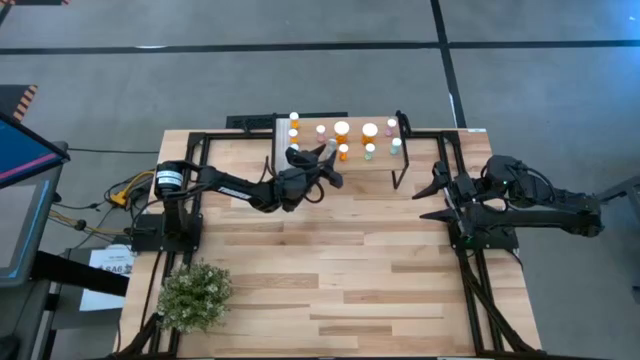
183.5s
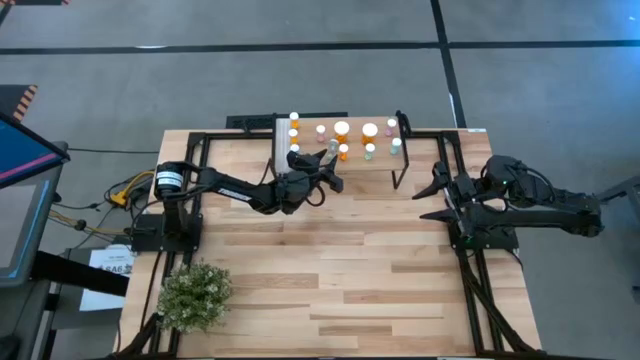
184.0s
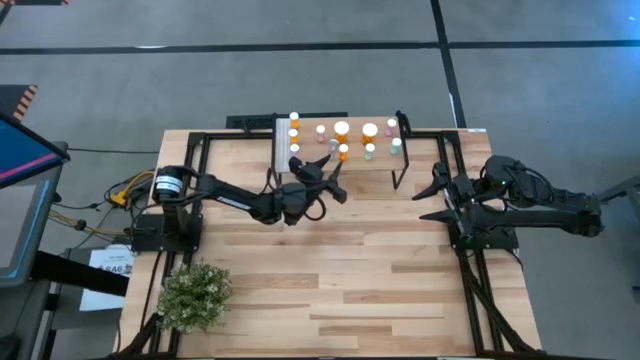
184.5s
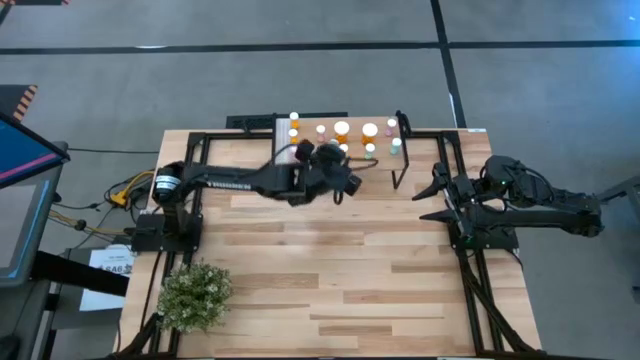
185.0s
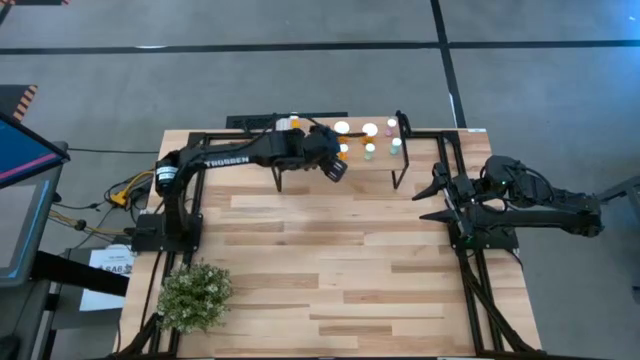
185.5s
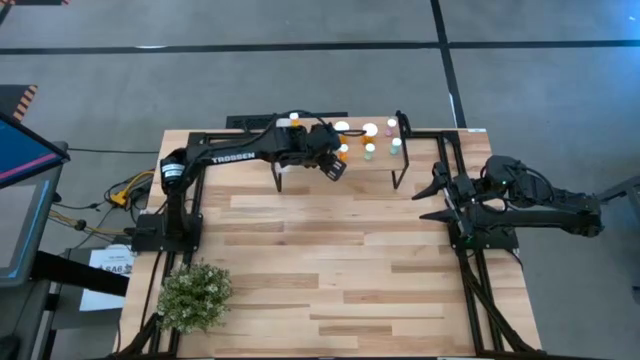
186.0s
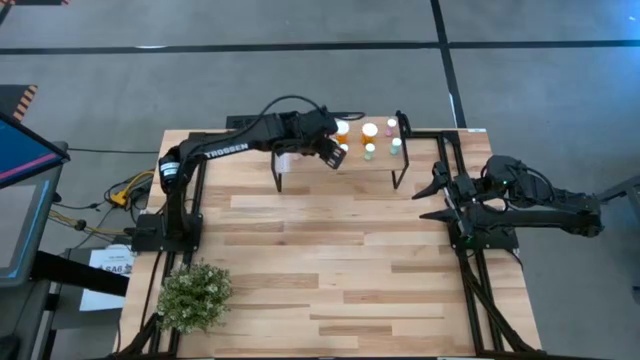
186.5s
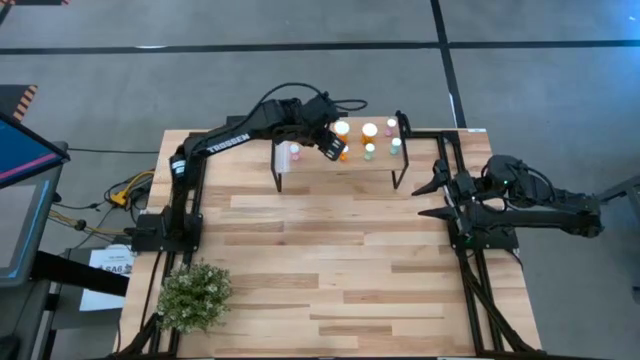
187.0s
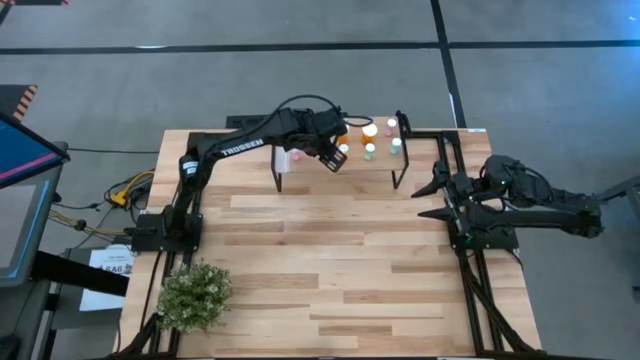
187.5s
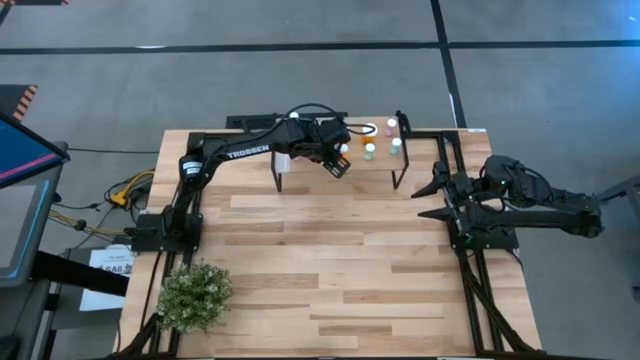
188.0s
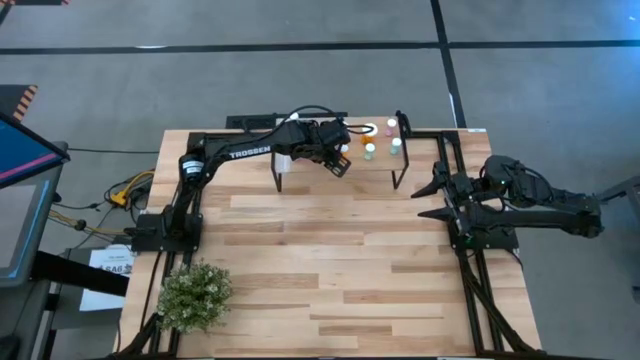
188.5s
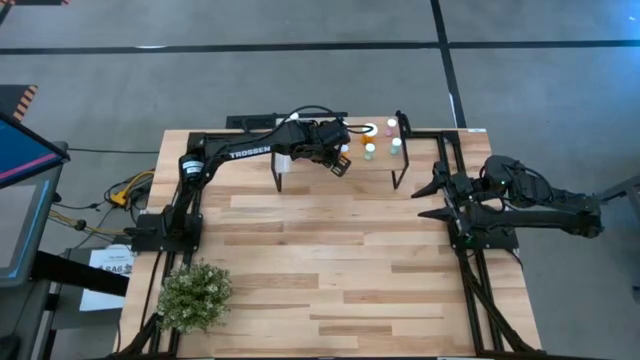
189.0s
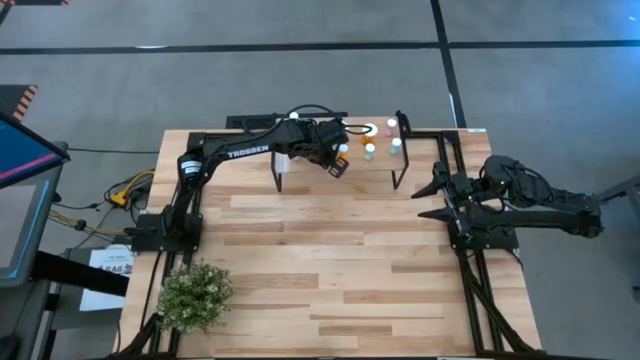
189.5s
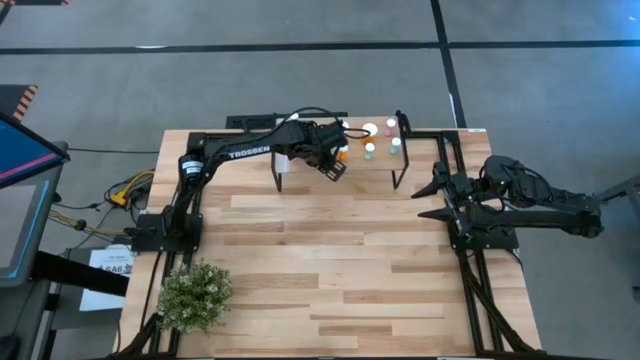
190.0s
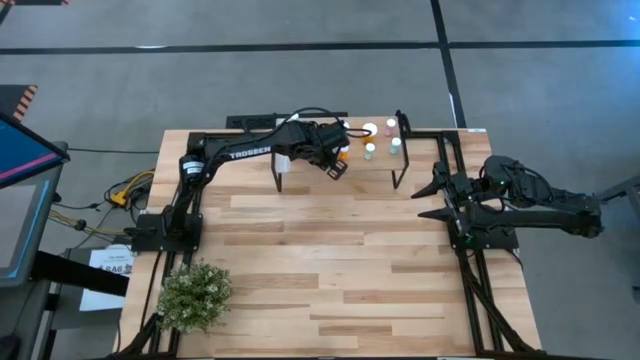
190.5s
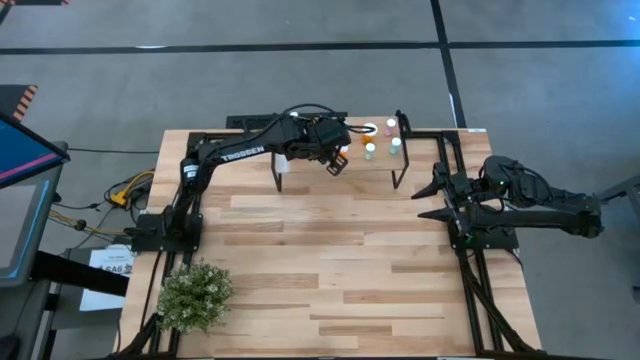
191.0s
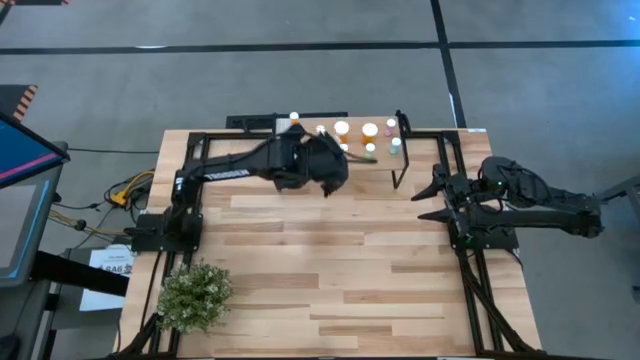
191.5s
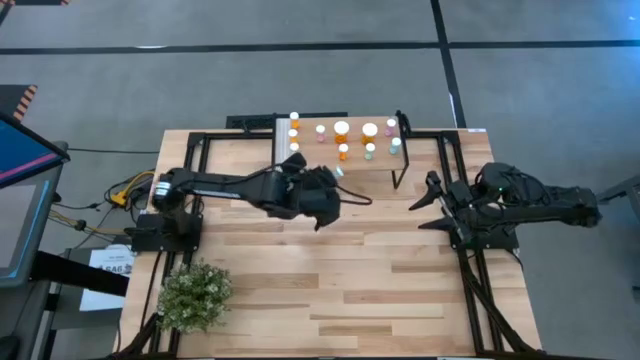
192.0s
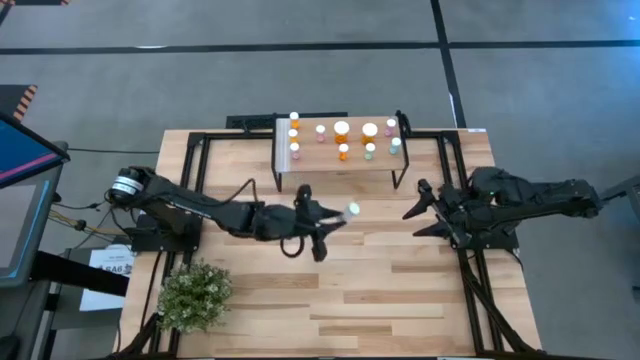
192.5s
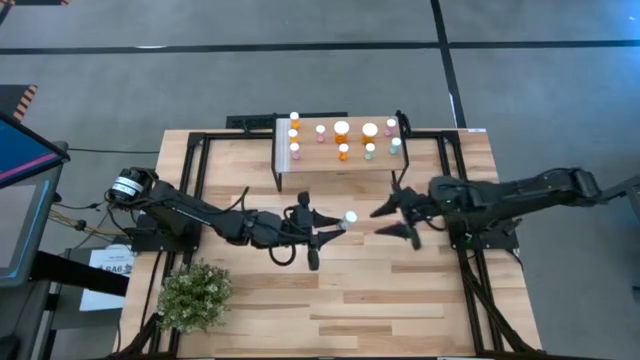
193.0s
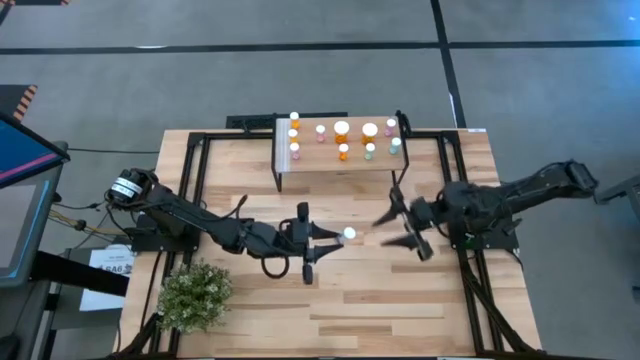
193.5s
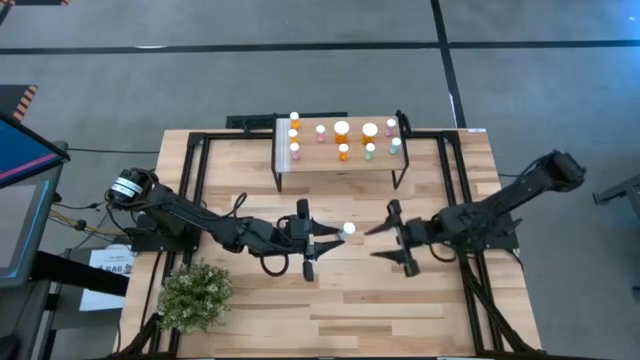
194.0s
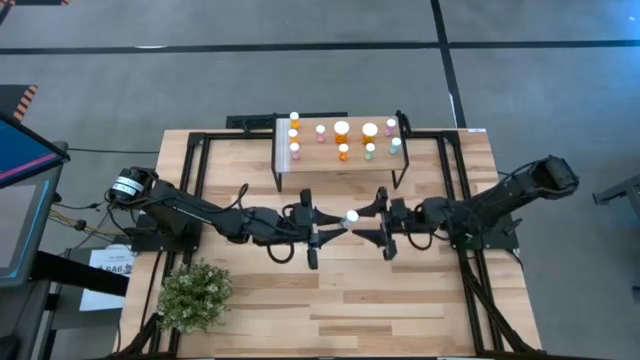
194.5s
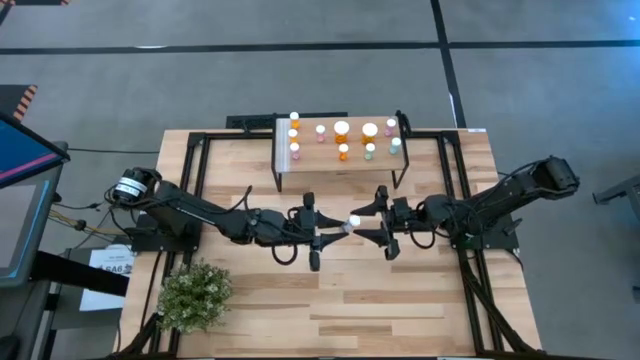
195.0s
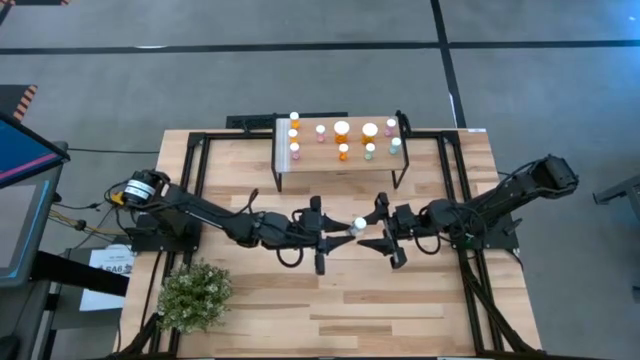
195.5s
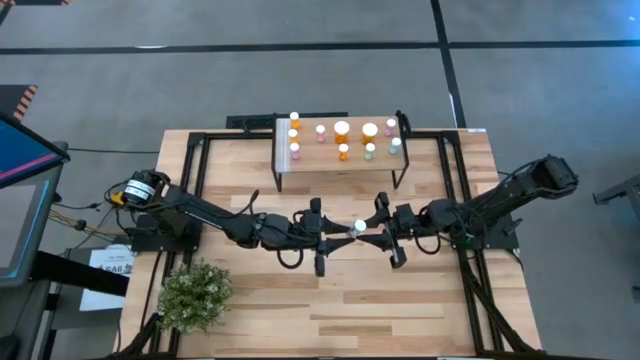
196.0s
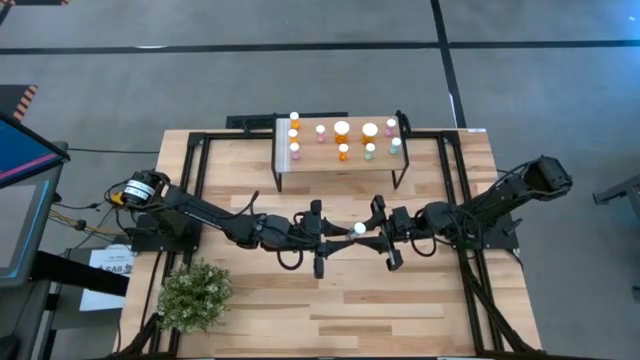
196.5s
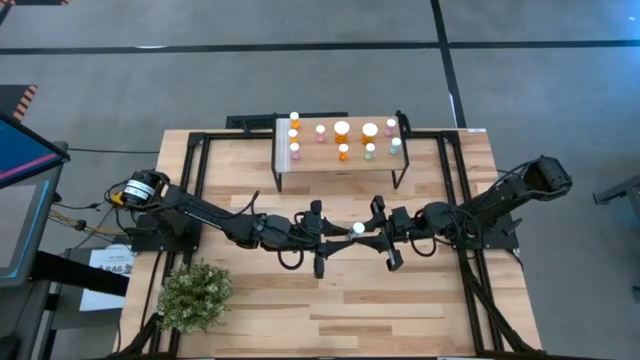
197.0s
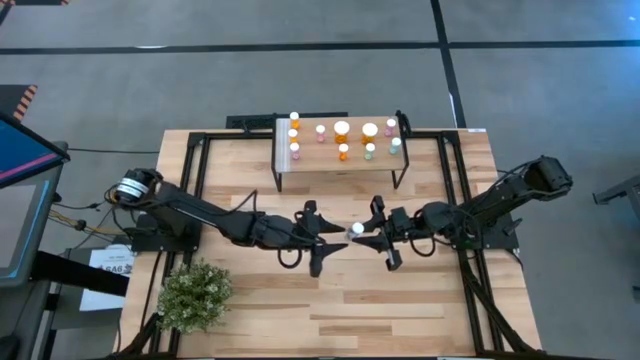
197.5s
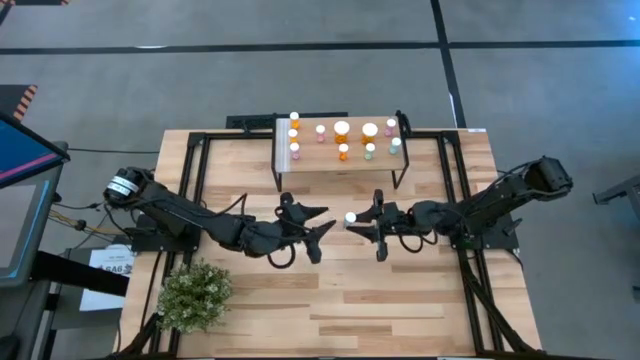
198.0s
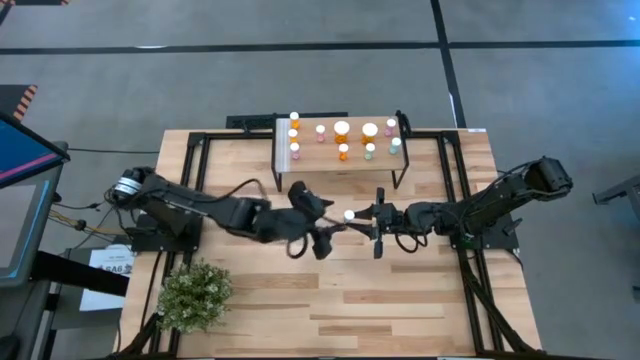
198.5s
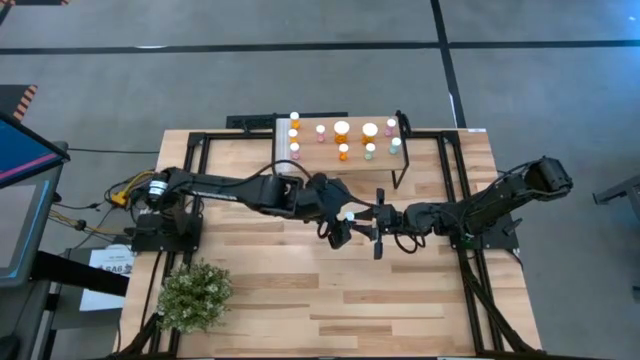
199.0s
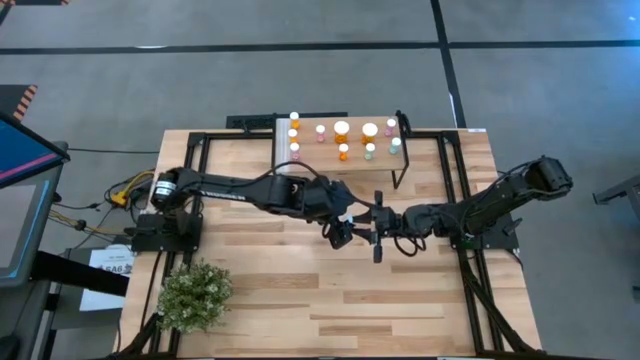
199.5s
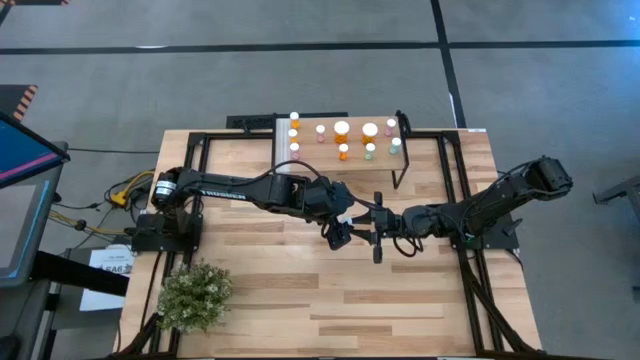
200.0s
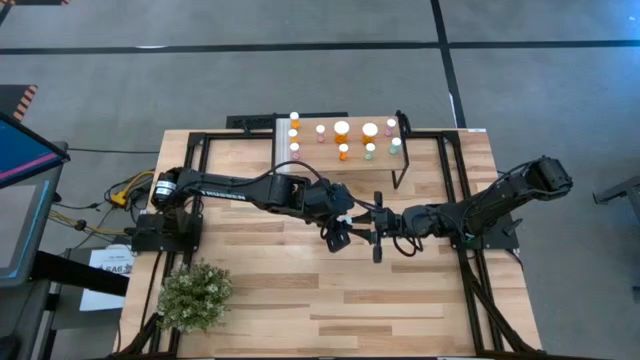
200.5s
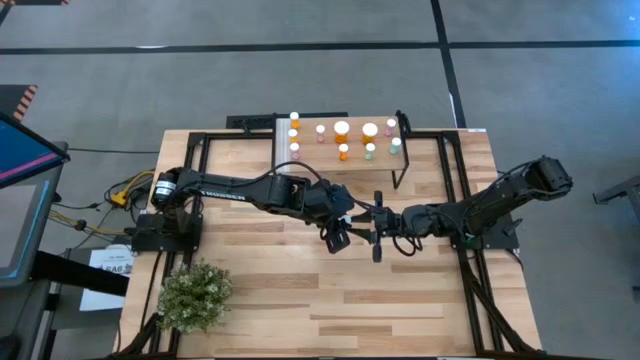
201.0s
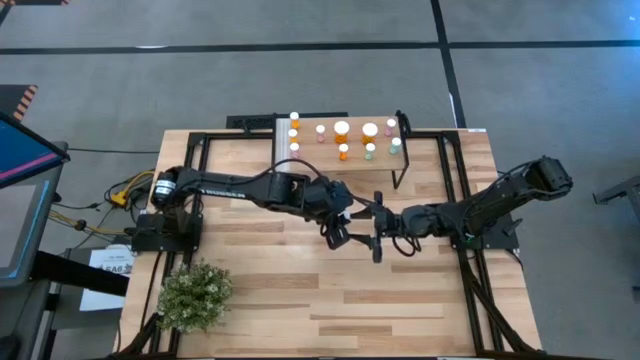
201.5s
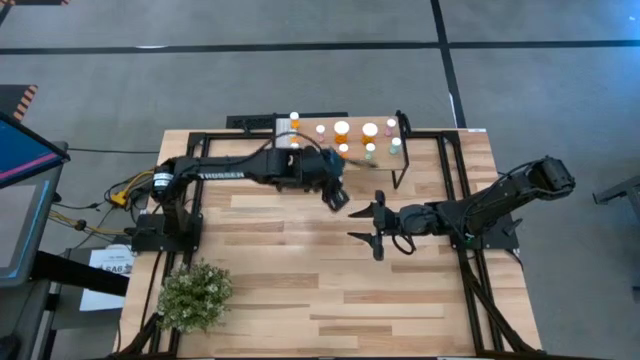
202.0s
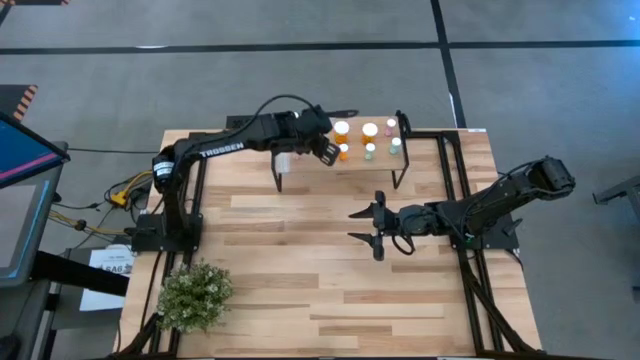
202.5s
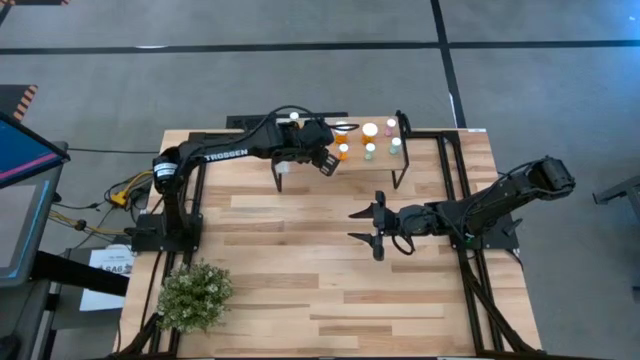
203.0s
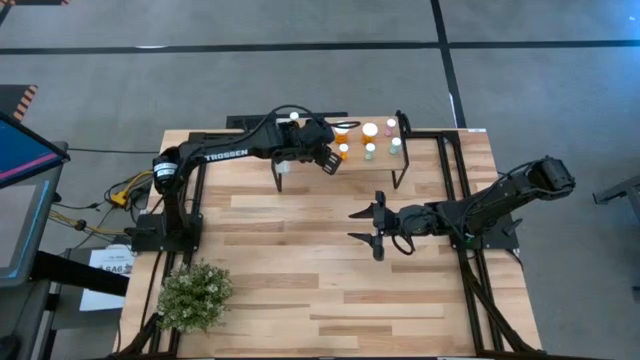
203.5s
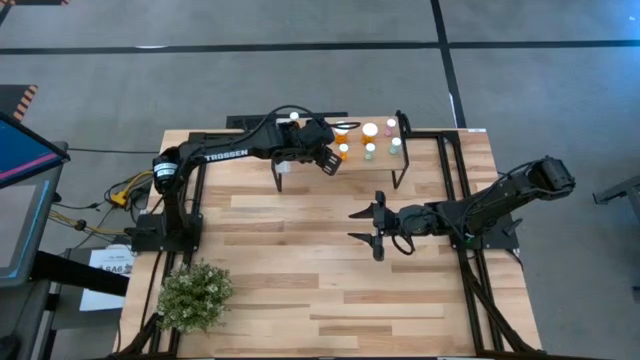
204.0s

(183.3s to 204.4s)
Task: Pick and place medicine bottles onto shelf by color
Put the small blue pill bottle on the shelf
